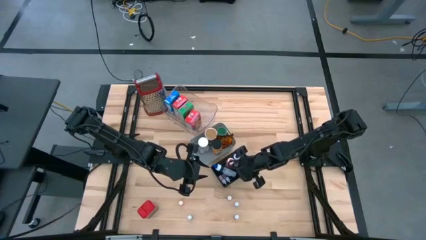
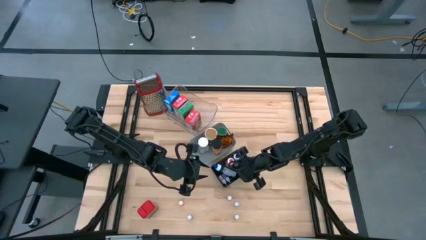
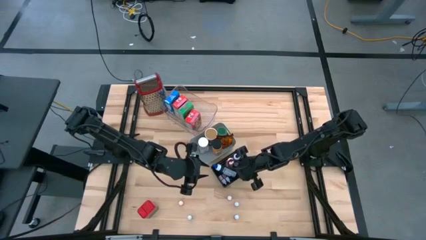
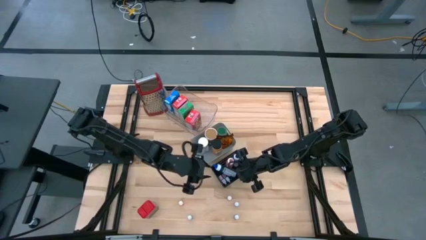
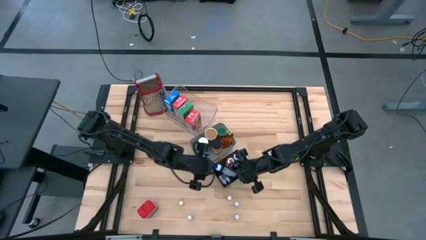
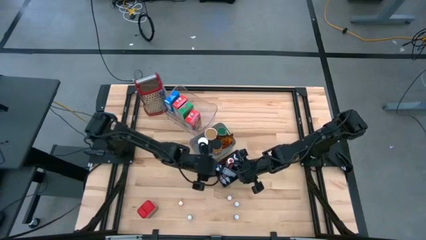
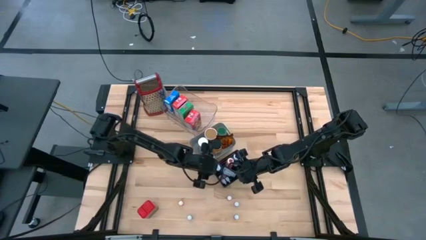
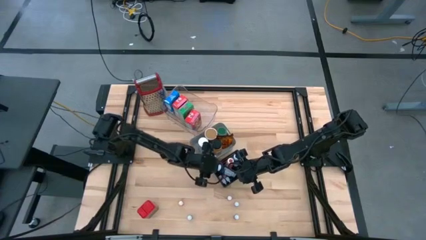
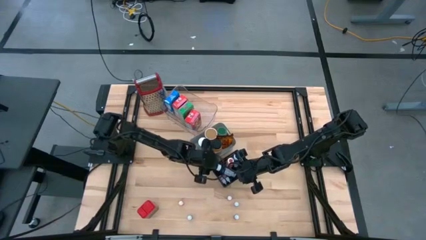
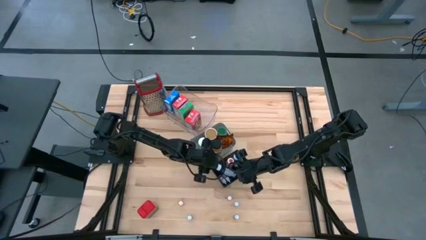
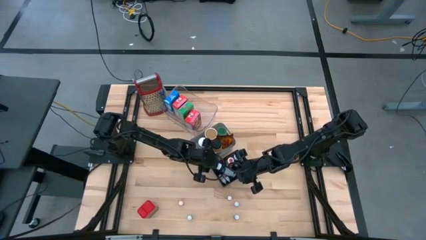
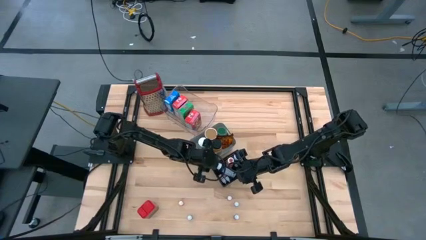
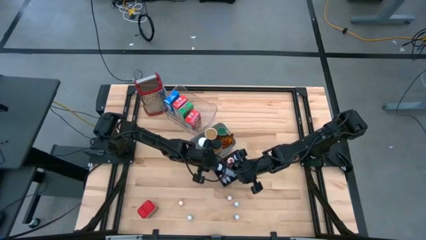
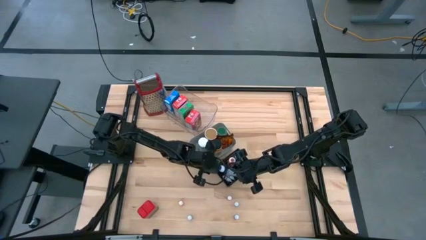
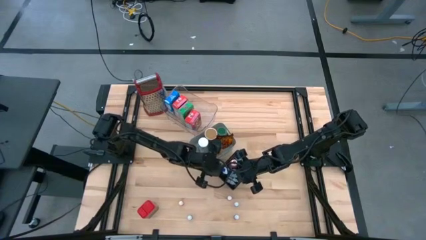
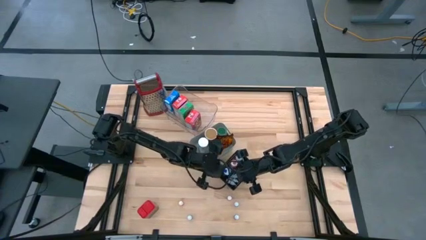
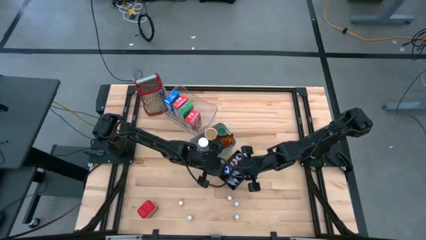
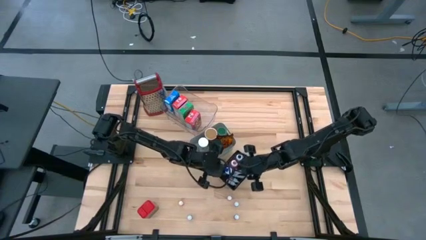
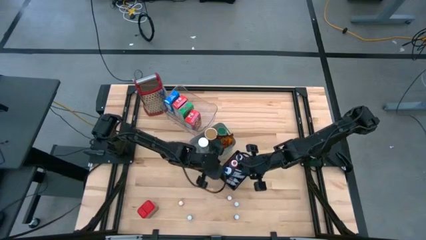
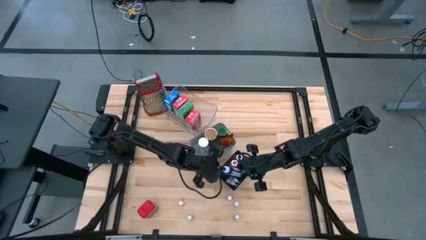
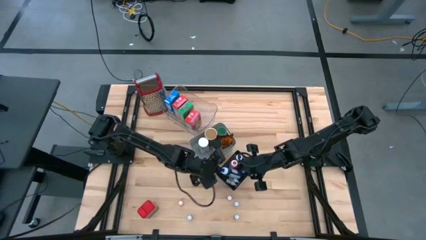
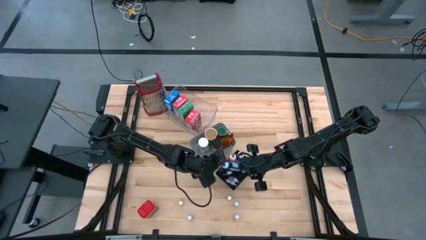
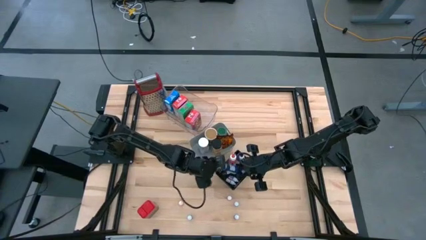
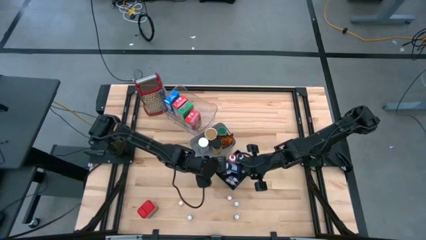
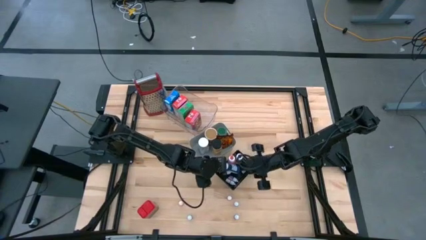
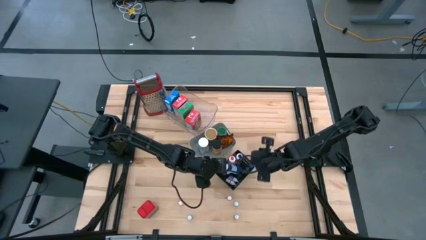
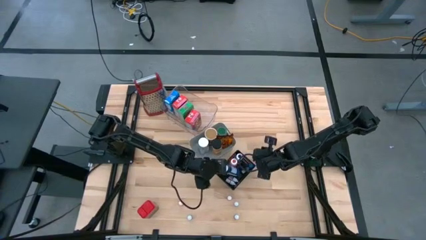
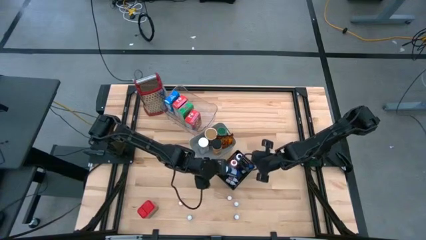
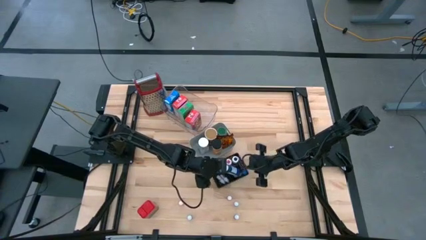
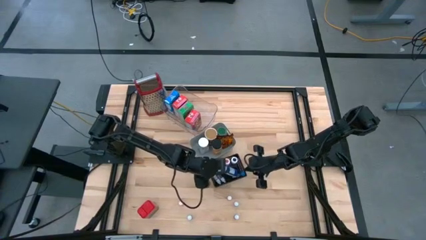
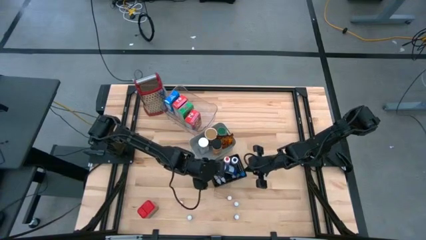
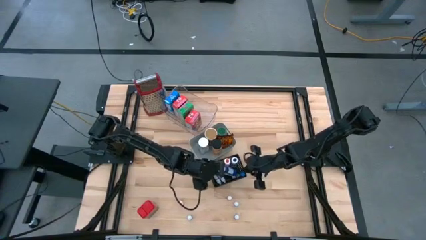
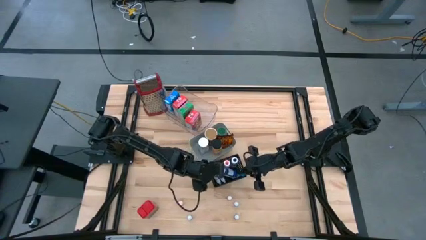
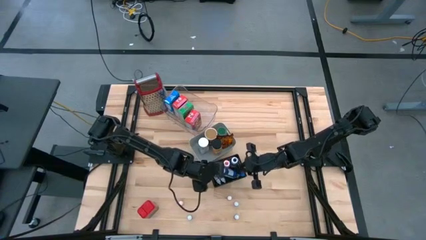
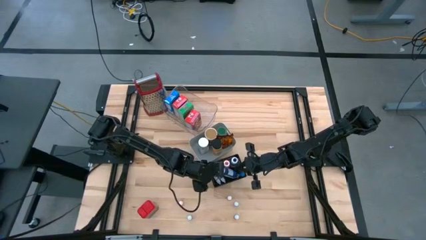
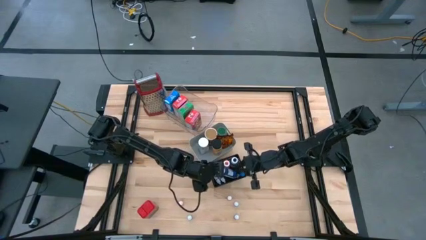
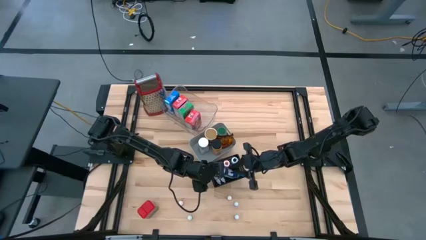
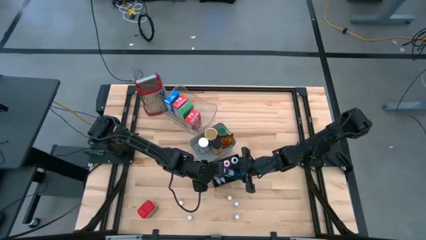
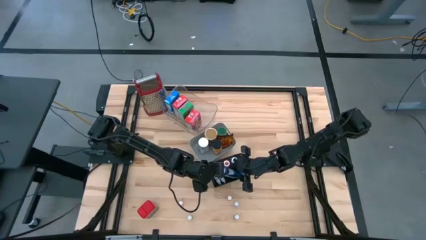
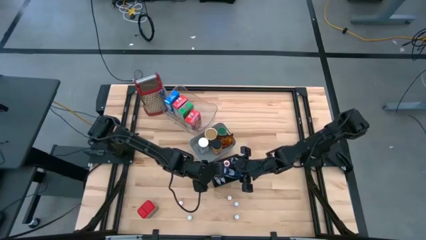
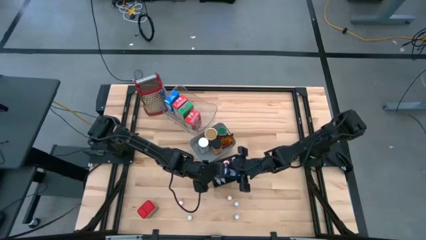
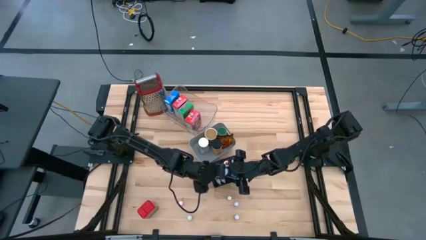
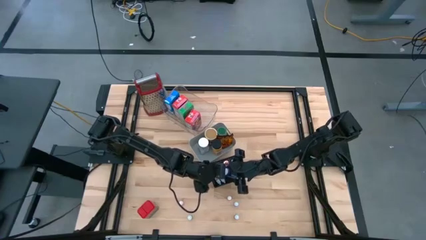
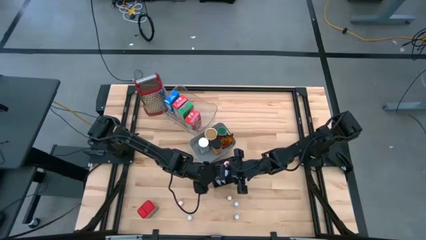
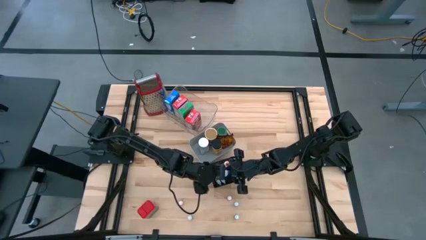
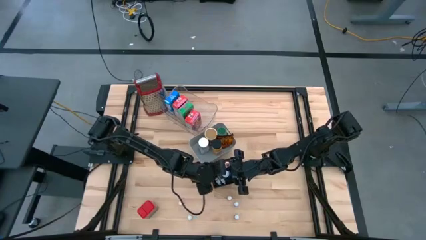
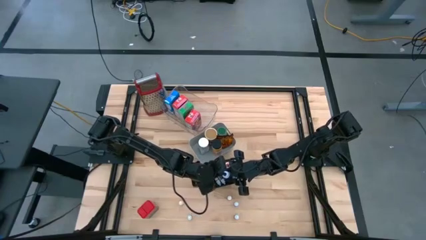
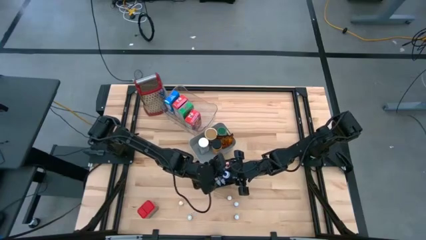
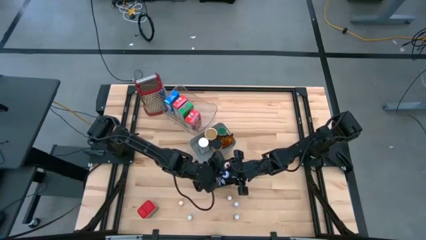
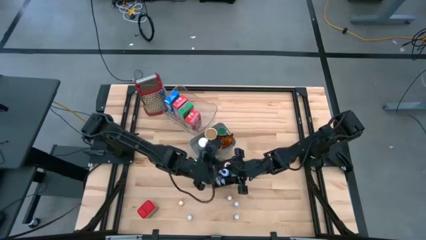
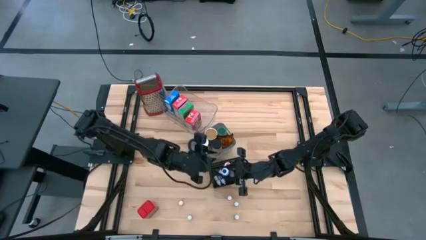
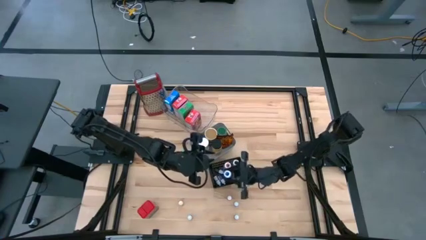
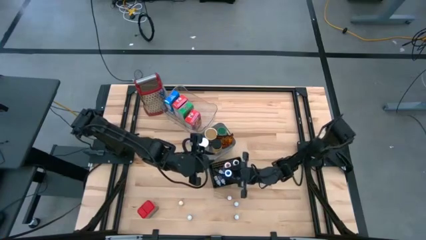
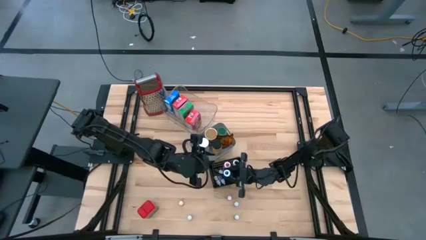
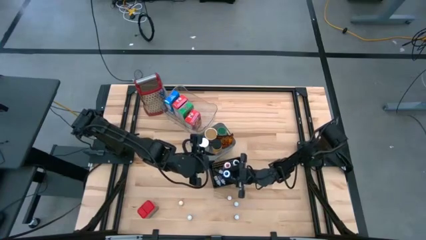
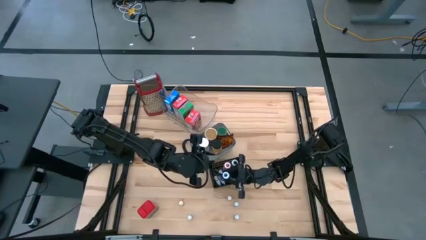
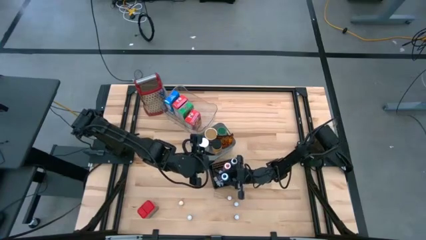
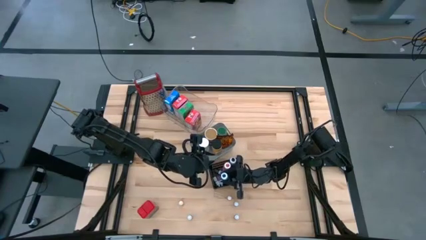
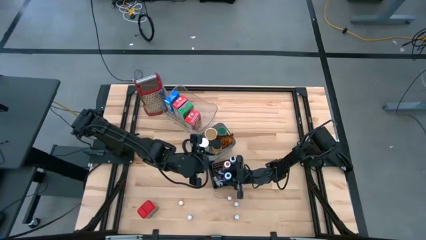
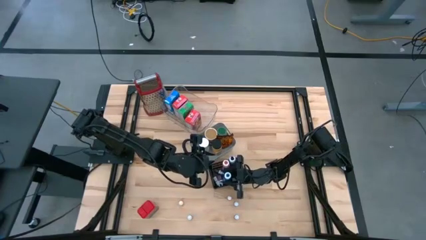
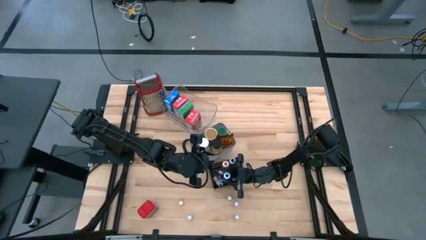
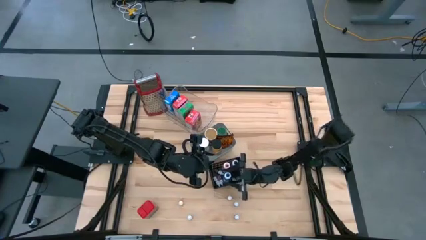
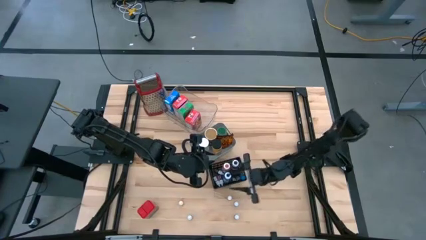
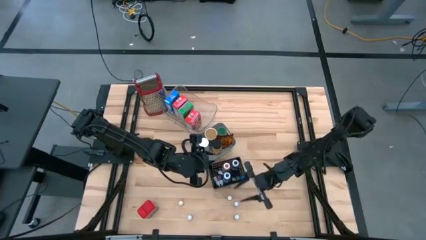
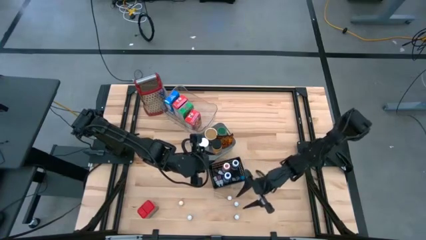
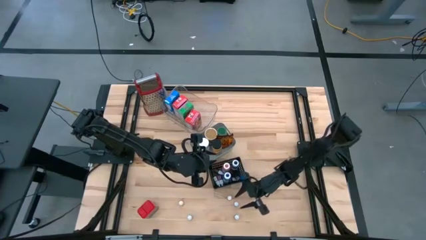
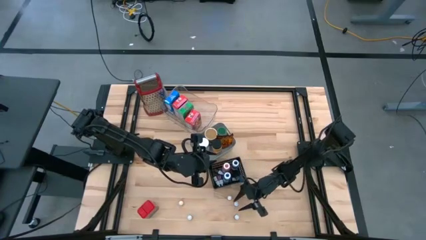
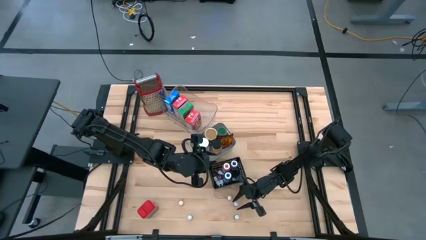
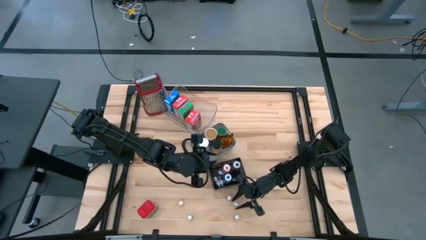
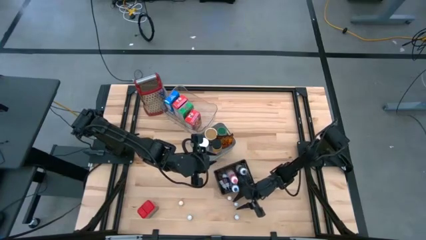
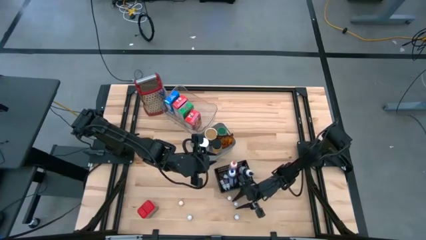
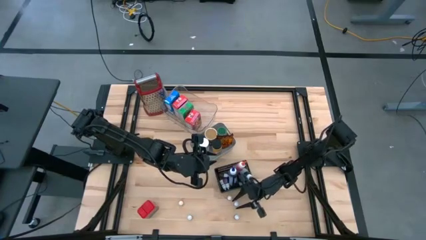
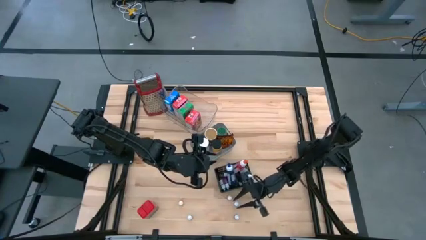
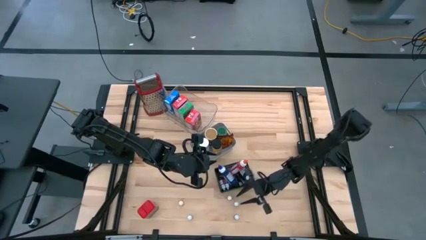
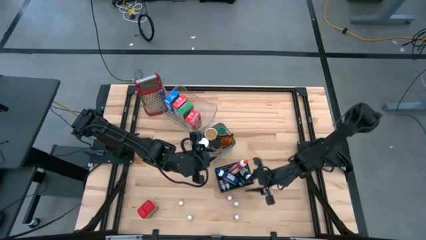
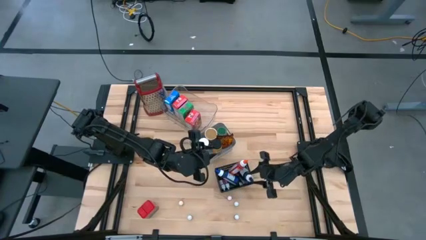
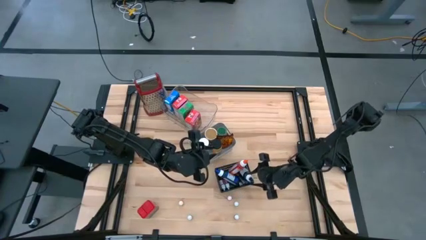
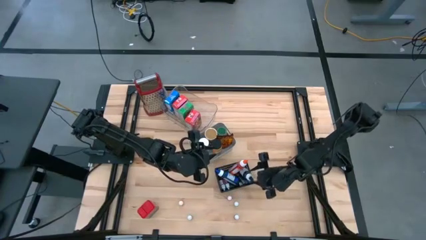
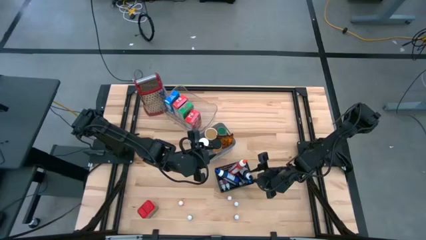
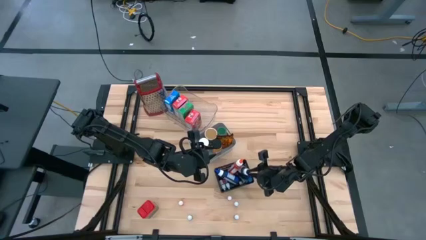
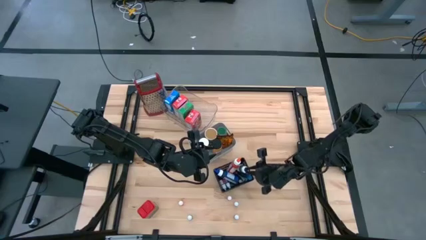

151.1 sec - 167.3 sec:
Task: Pick & Place Kitchen Items
Adjust the food coloring bottles on the black bin
